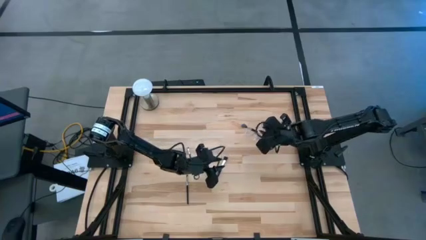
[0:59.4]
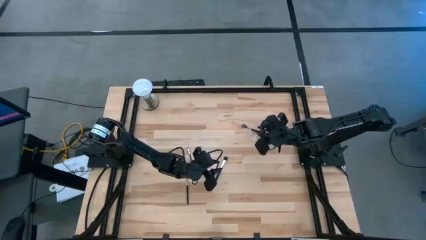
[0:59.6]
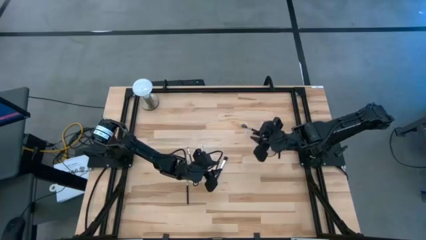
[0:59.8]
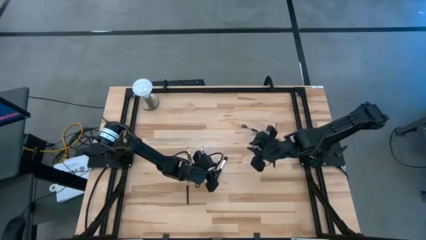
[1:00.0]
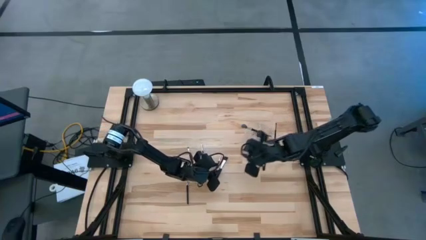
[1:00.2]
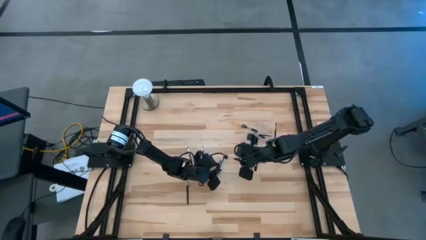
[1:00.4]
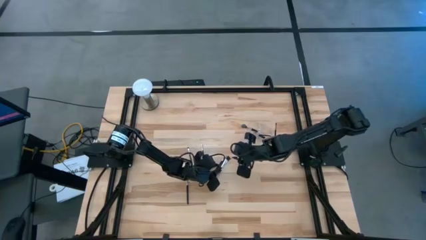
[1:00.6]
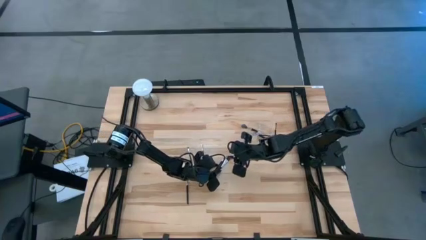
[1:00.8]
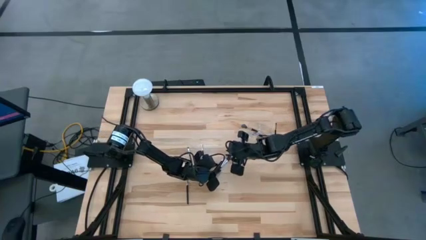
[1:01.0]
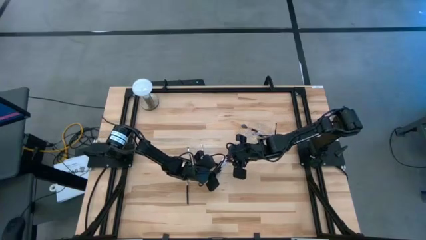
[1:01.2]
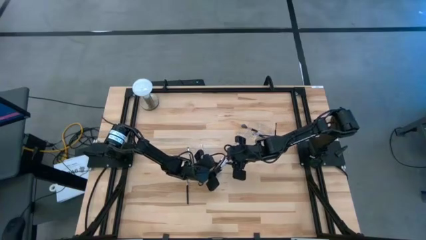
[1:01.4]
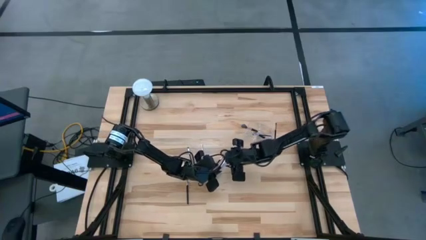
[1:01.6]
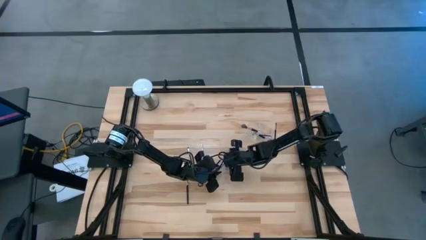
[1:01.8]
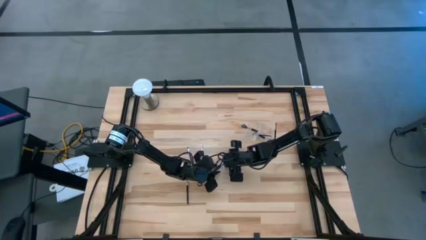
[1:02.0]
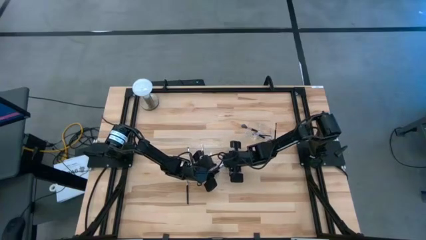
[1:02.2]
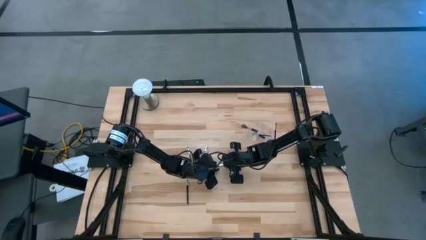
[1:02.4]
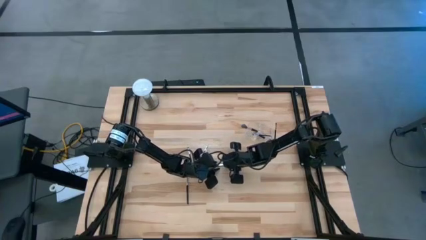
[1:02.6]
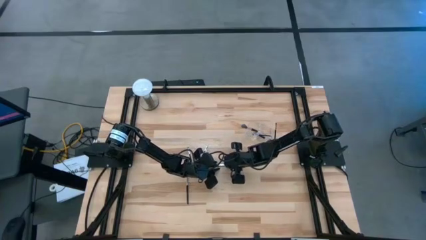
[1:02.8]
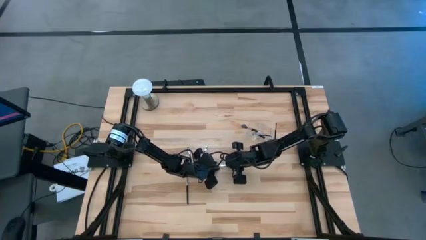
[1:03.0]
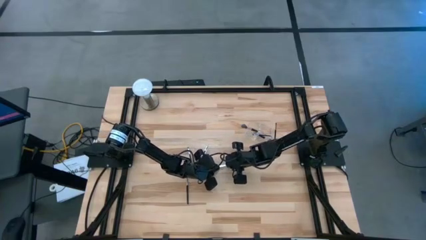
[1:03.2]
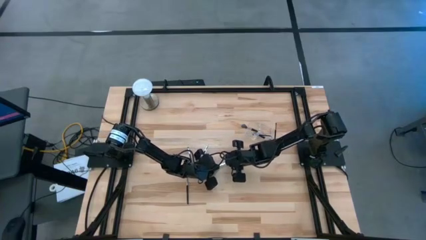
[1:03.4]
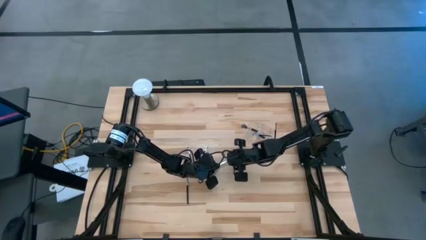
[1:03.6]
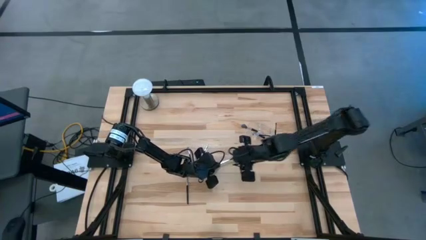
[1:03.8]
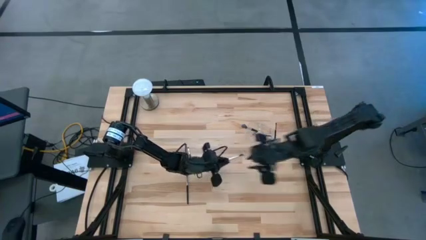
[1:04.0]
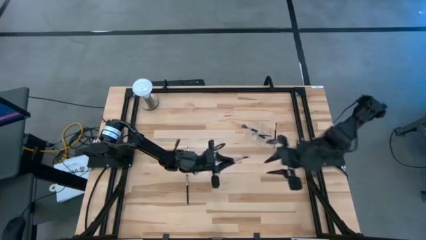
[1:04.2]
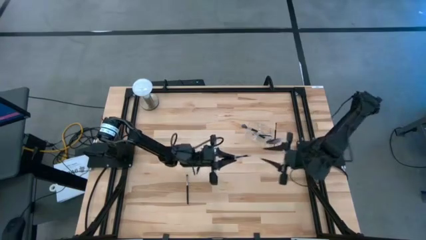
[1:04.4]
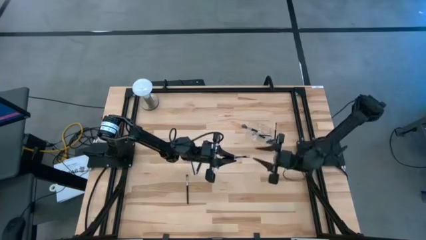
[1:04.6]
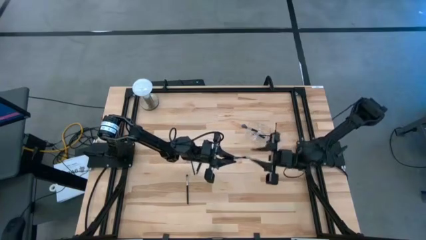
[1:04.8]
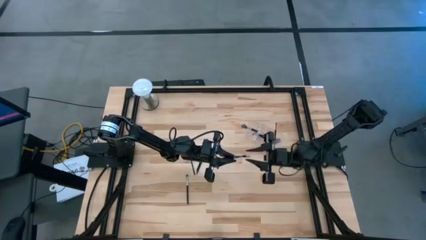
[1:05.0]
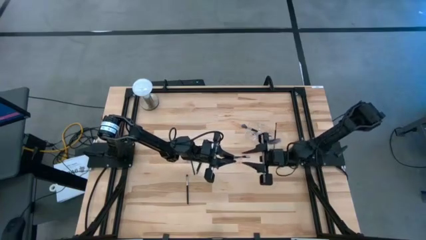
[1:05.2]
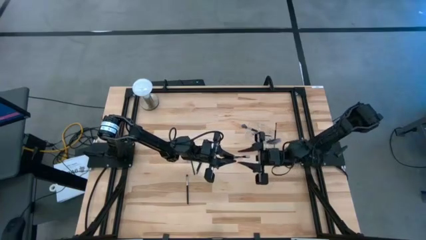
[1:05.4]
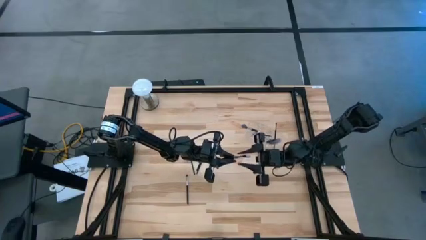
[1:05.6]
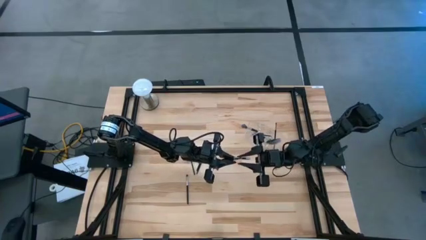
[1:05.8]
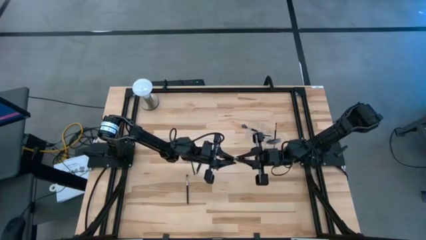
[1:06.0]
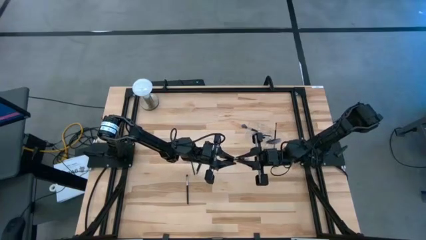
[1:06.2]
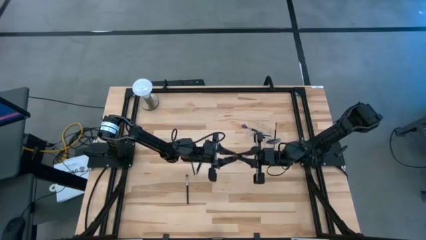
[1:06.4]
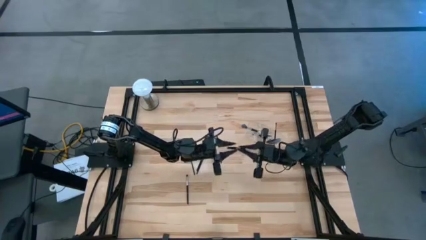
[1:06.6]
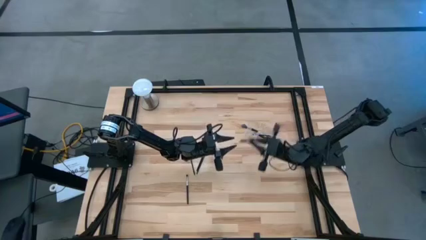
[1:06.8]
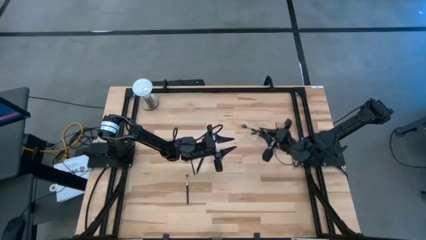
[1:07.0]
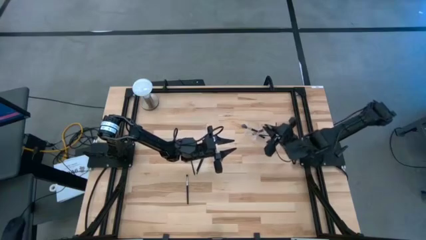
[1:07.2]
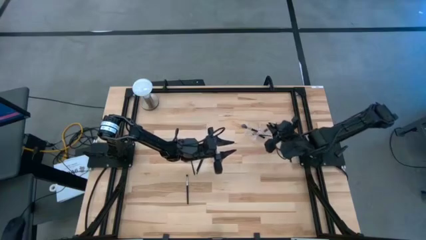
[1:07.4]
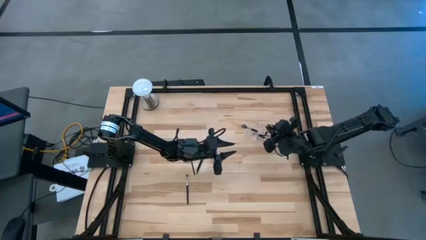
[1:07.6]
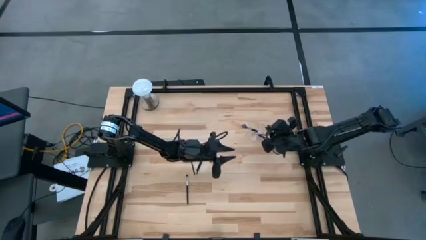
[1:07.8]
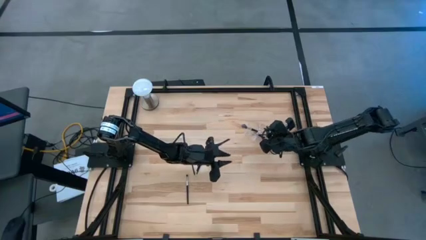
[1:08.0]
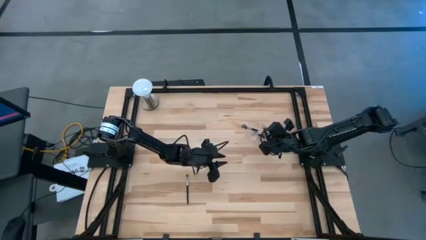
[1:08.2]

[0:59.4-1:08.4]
Task: Pick & Place Makeup Supplies
Put the black makeup brush into the transparent organizer

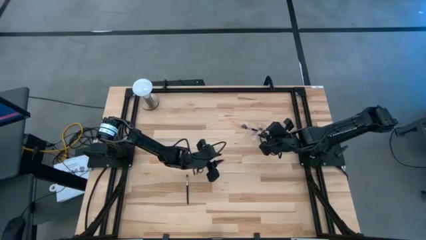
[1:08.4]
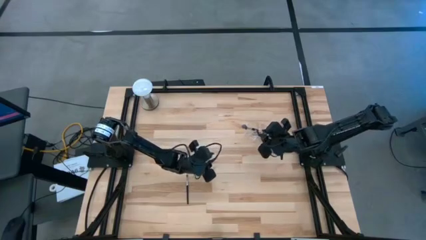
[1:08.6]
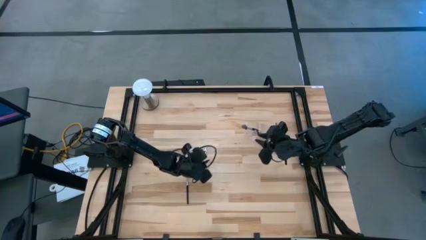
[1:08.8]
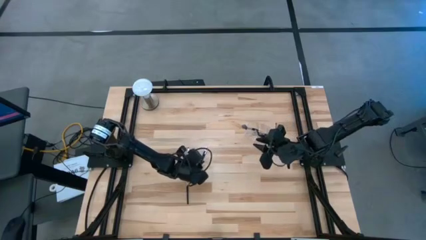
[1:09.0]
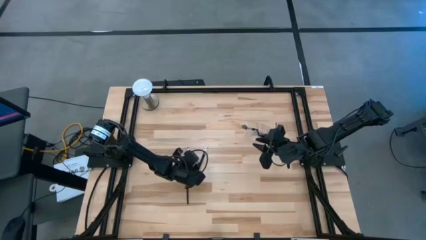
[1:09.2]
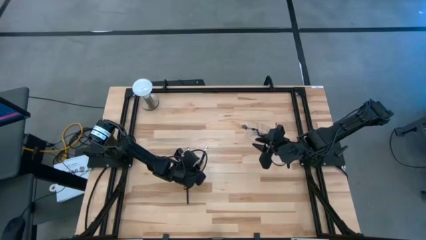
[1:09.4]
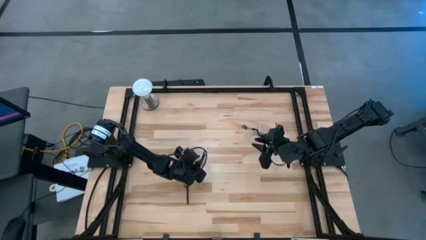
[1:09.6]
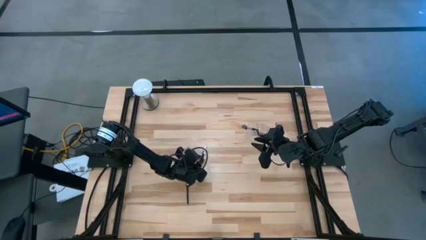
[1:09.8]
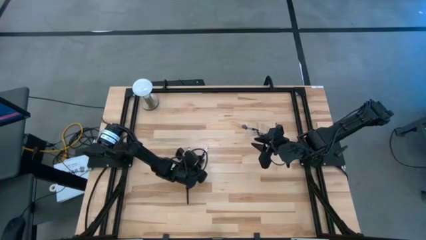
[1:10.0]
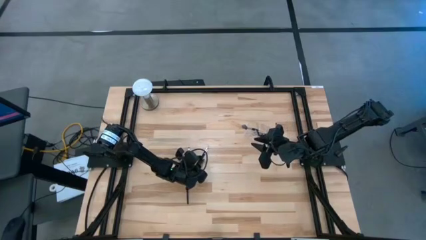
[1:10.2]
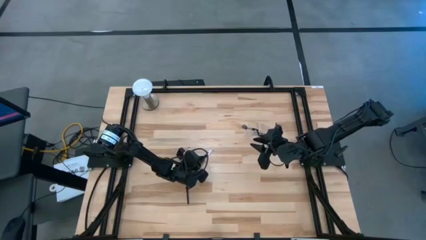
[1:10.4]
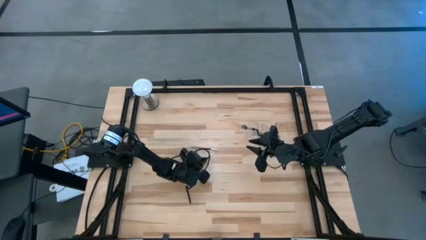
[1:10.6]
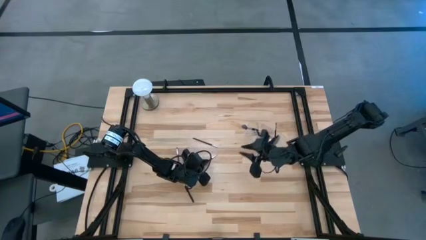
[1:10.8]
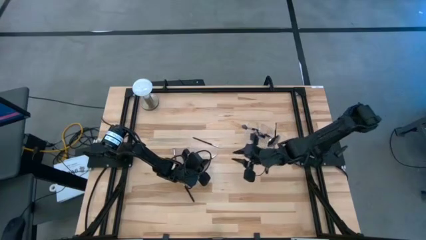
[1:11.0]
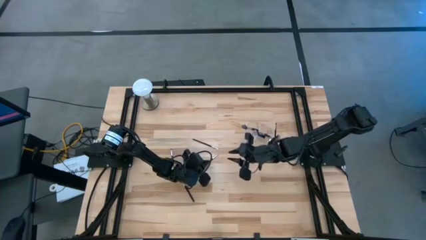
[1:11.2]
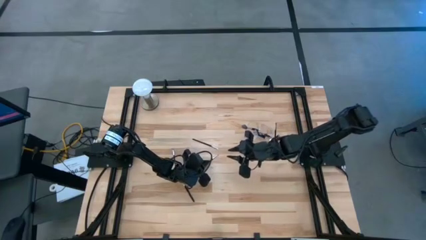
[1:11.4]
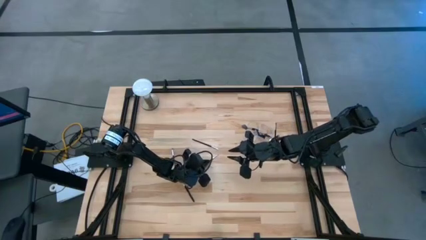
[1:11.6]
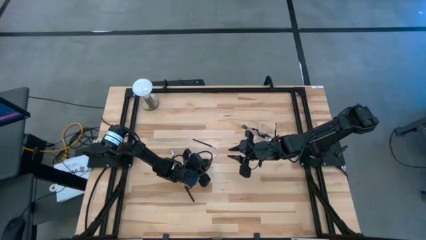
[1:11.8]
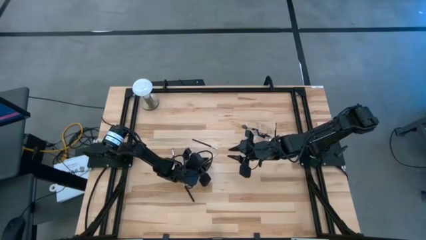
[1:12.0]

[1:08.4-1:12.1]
Put the black makeup brush into the transparent organizer

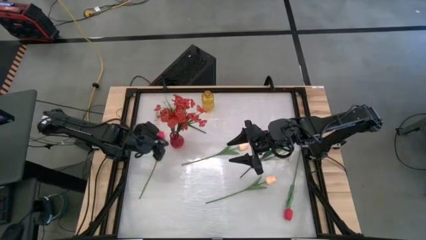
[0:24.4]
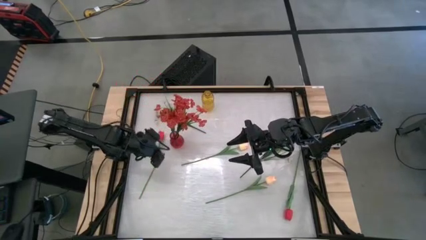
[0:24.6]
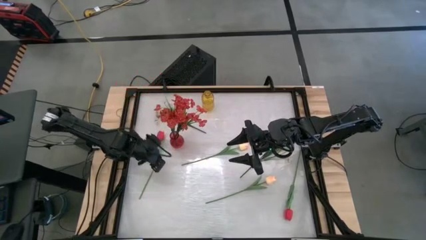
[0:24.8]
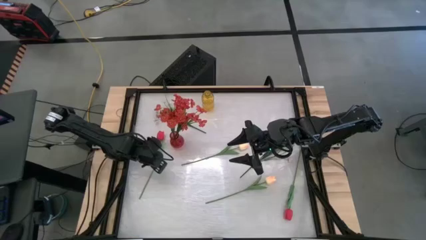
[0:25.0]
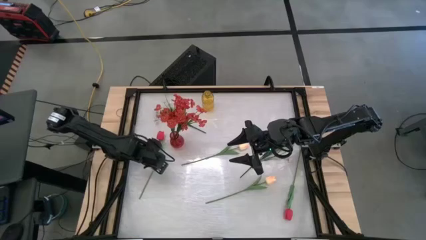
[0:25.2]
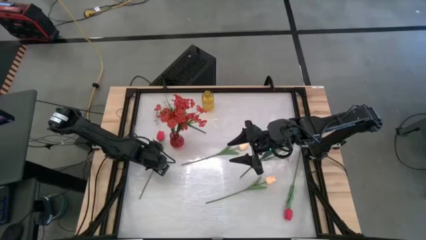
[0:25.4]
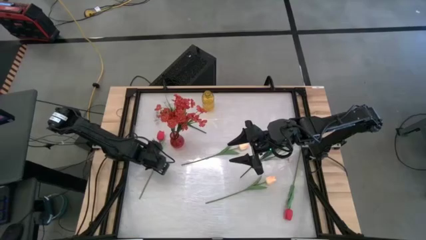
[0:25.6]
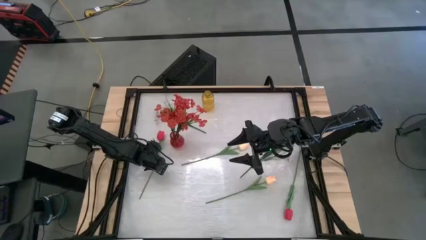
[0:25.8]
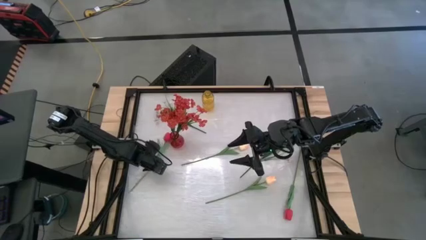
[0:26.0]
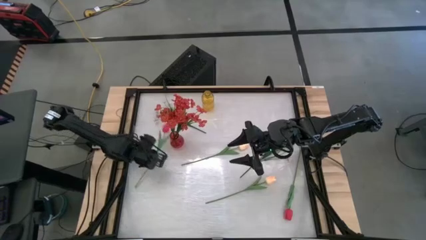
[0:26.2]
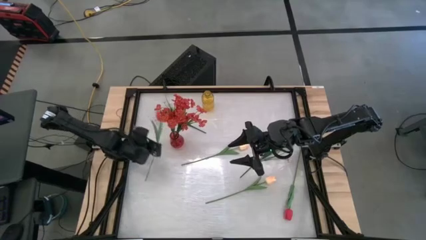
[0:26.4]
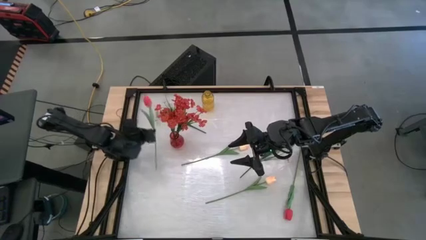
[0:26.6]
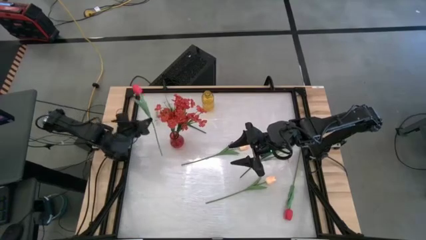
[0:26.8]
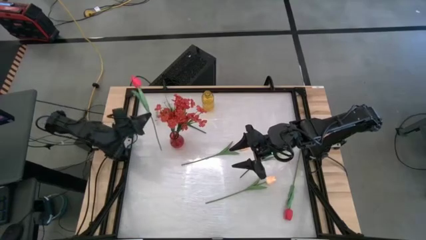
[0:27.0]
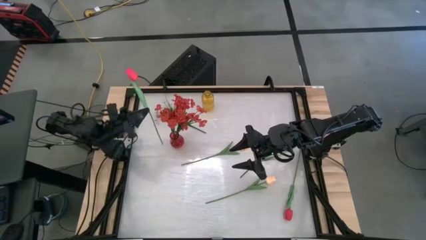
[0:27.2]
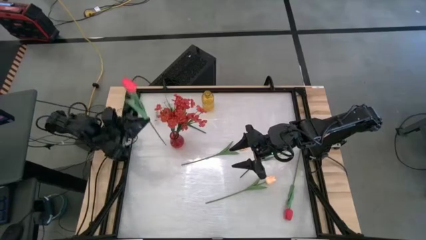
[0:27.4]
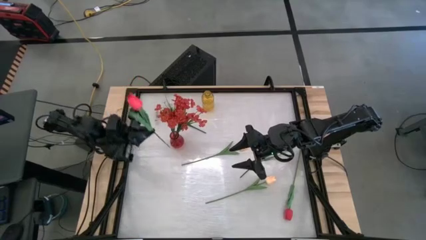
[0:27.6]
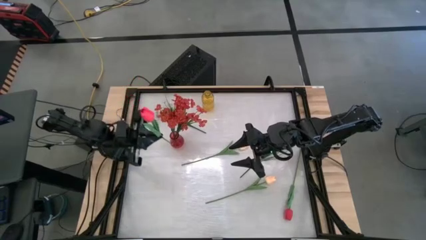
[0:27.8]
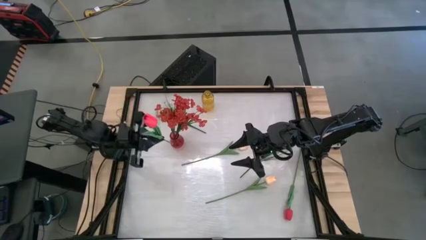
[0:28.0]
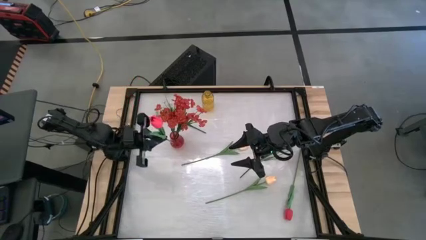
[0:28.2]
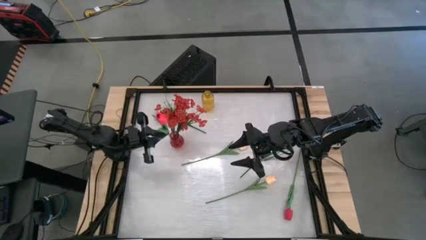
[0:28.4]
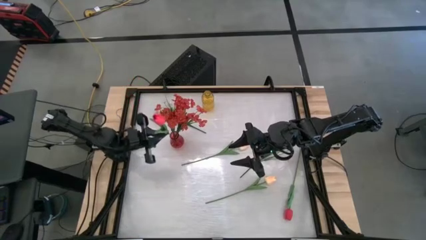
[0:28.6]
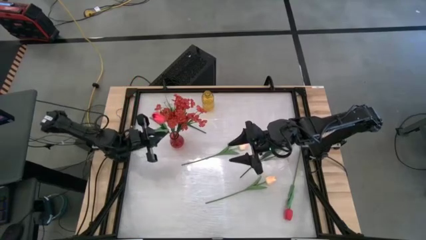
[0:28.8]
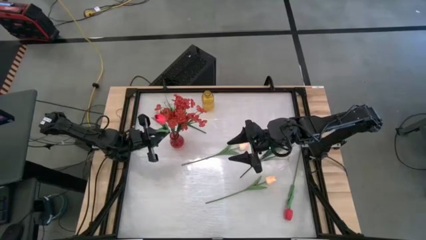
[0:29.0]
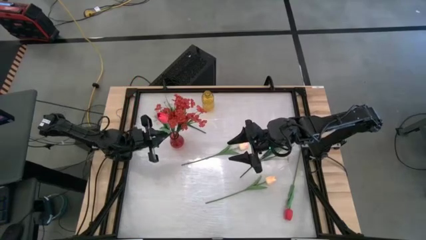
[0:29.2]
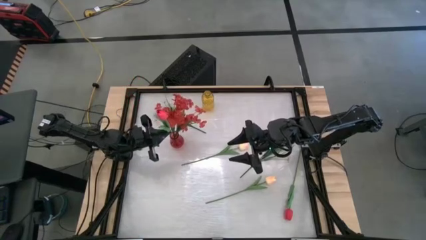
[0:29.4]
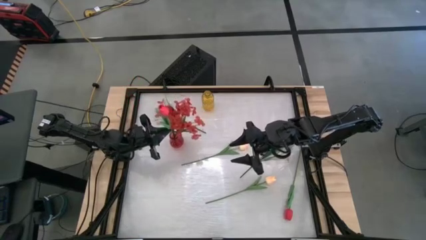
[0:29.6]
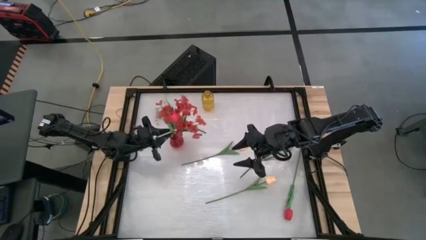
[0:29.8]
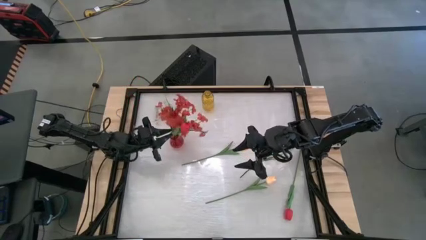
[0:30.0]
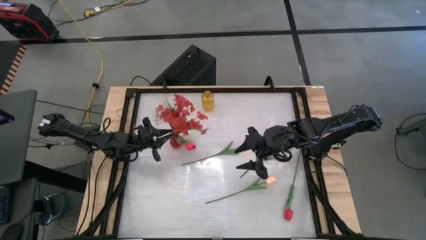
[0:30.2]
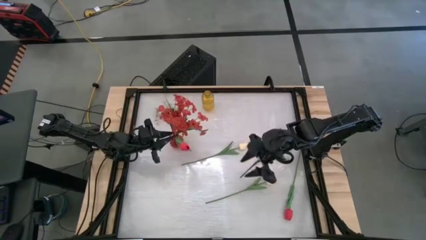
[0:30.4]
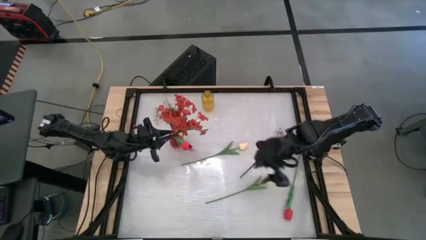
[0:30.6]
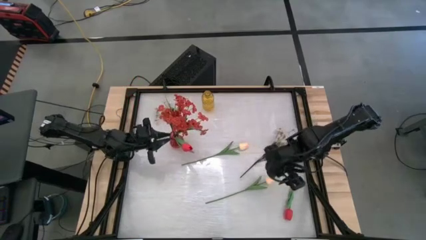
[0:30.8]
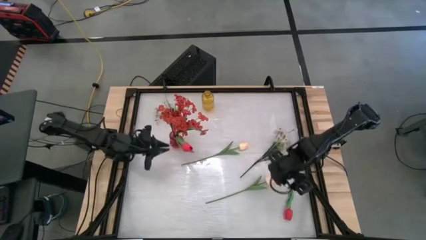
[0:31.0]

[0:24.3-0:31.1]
Task: Sort flowers into vase by color
Put the left red tulip into the red flower vase
